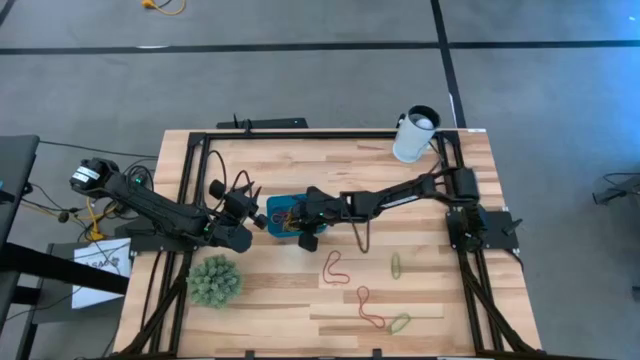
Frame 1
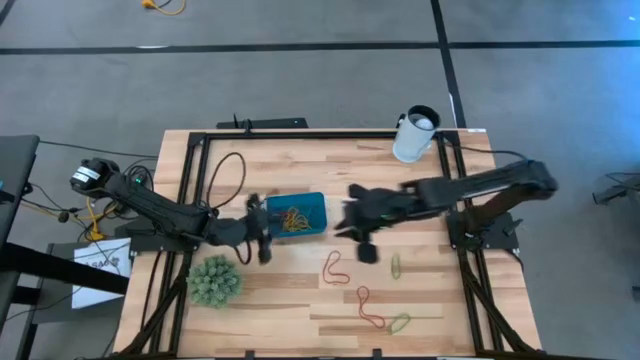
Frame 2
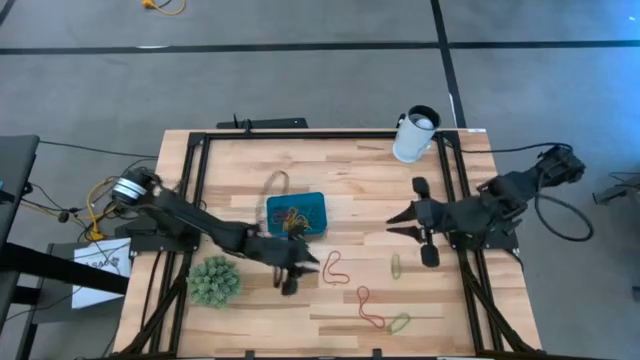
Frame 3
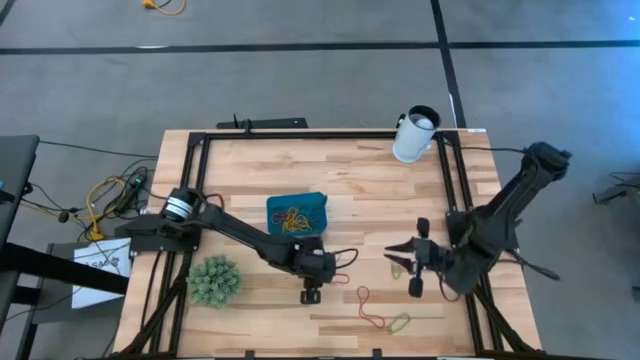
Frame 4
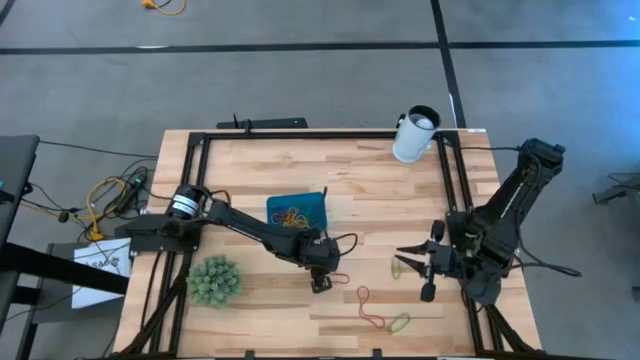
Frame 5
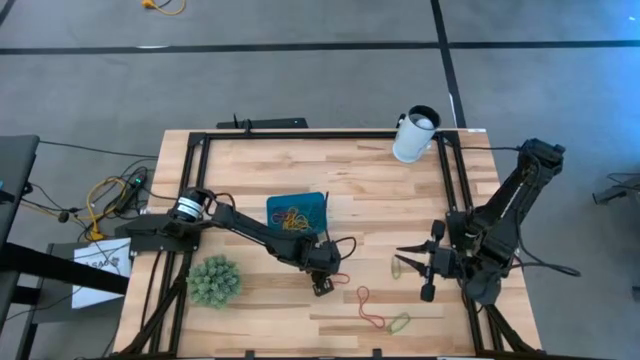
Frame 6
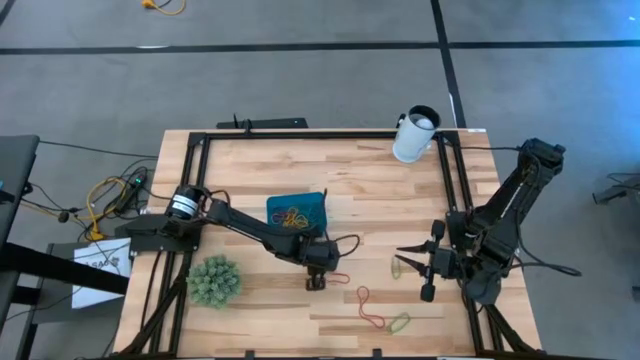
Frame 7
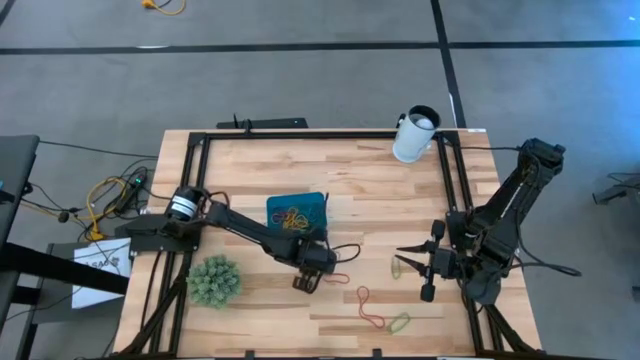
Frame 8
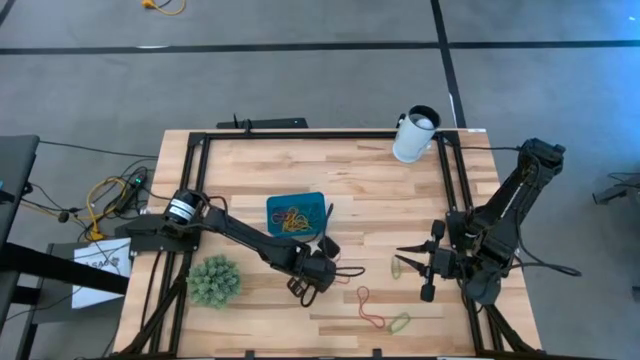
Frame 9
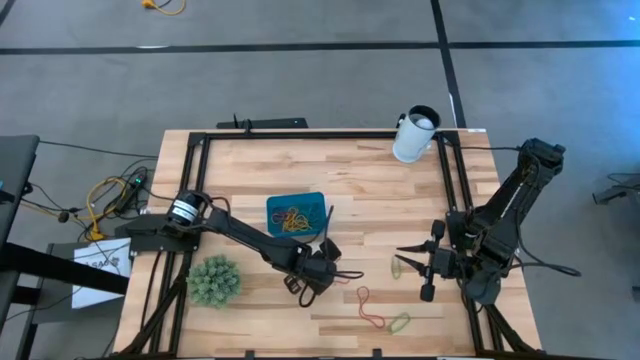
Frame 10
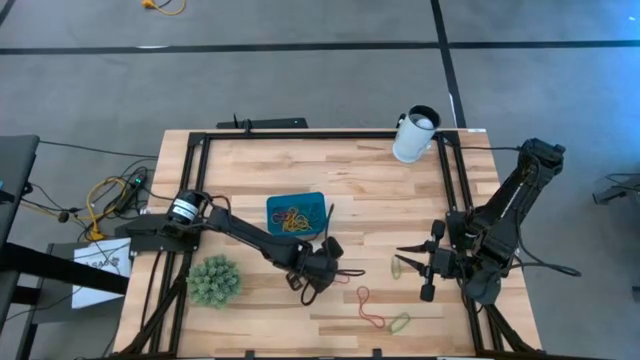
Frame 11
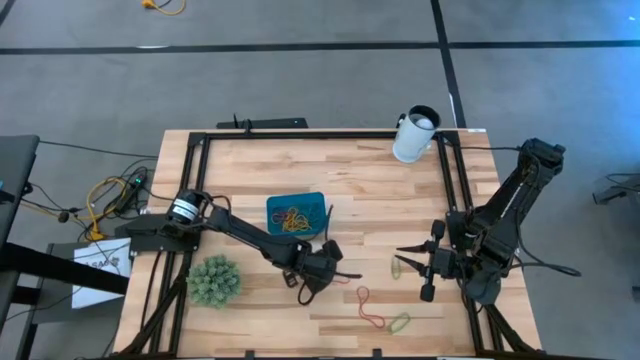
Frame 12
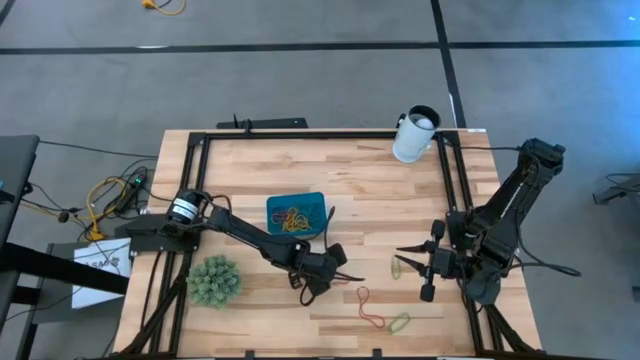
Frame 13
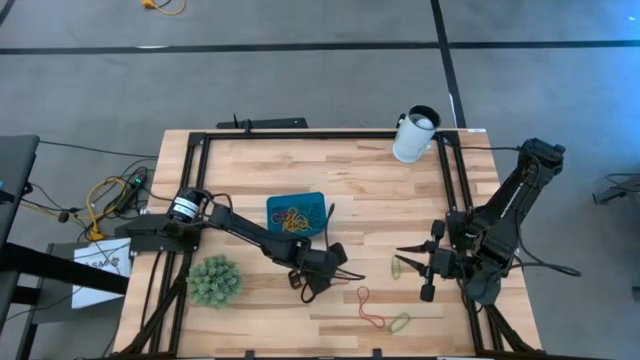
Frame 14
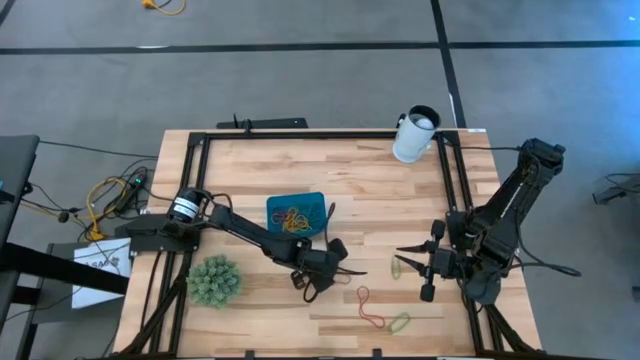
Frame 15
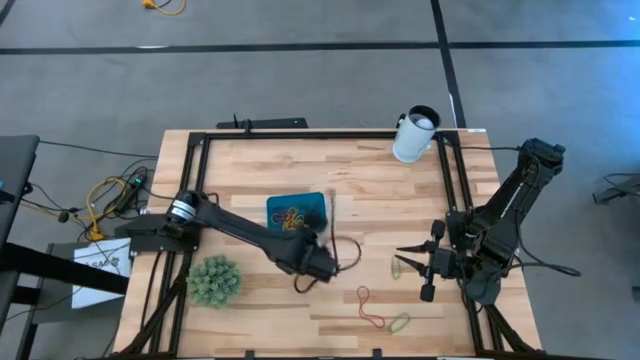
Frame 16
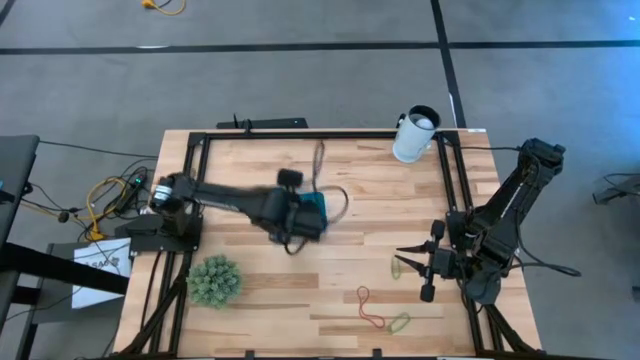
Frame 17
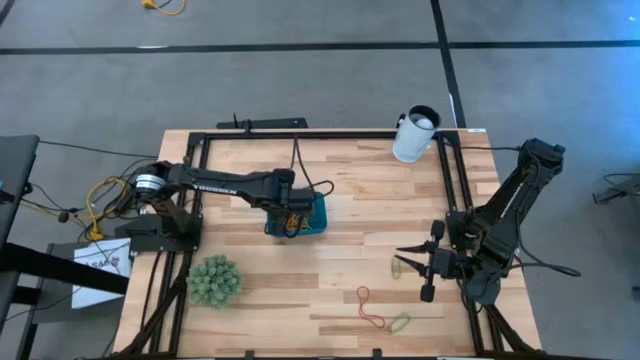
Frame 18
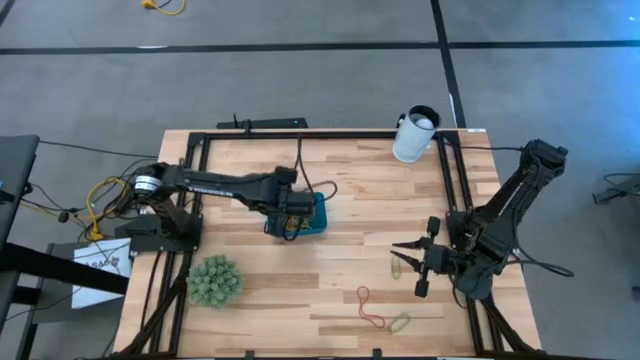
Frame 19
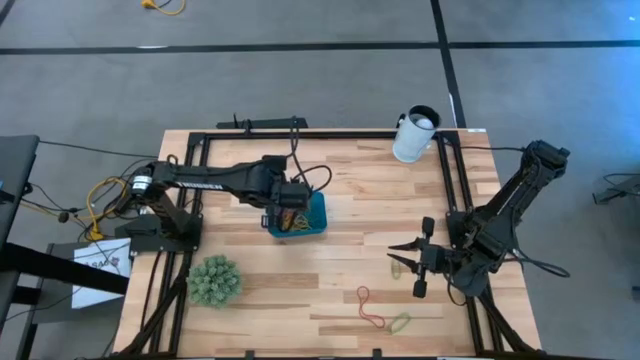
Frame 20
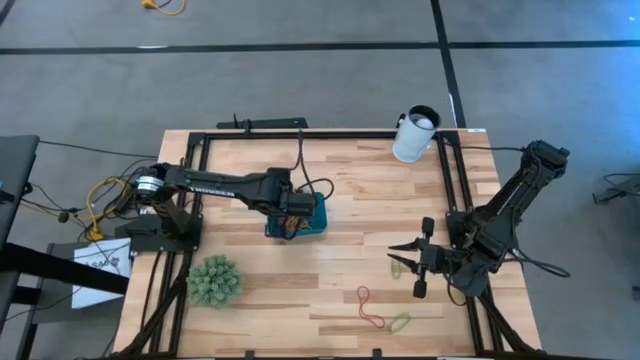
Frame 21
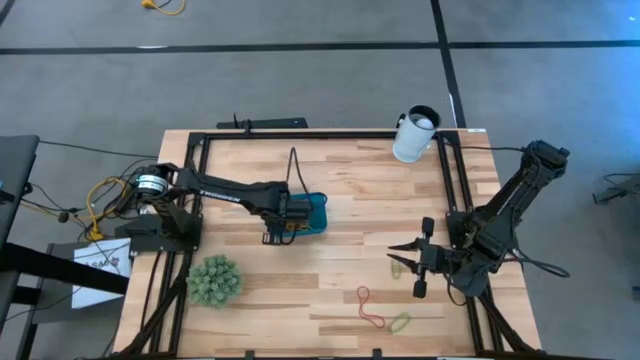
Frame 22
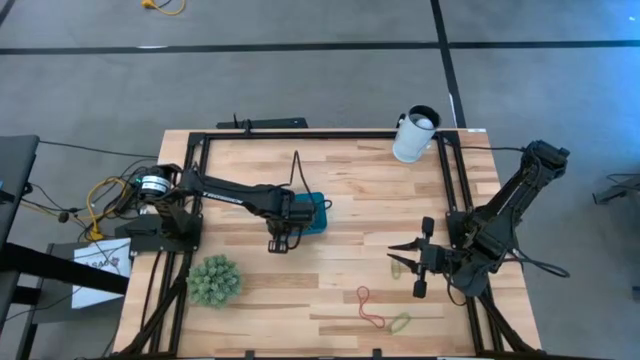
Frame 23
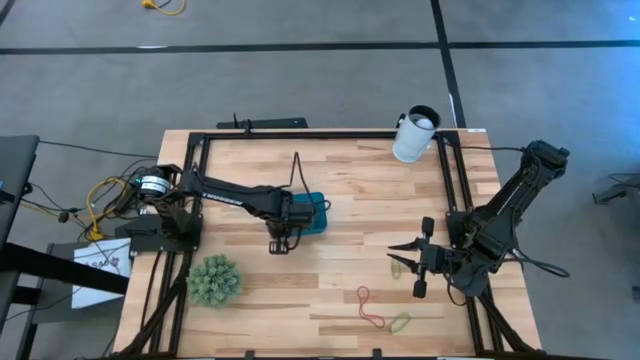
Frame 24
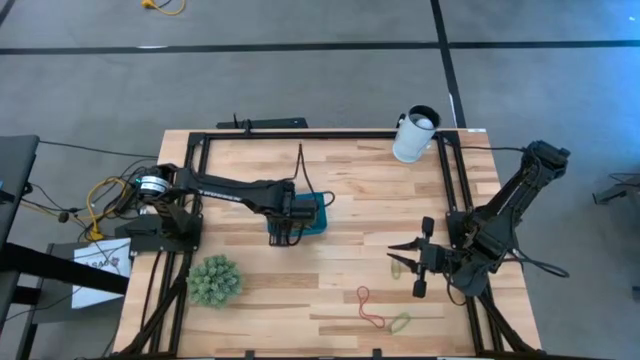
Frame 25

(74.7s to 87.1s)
Task: Pick and place items into bin
Put the red rubber band into the blue bin

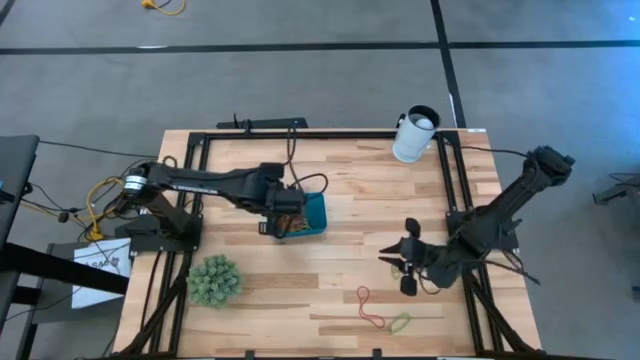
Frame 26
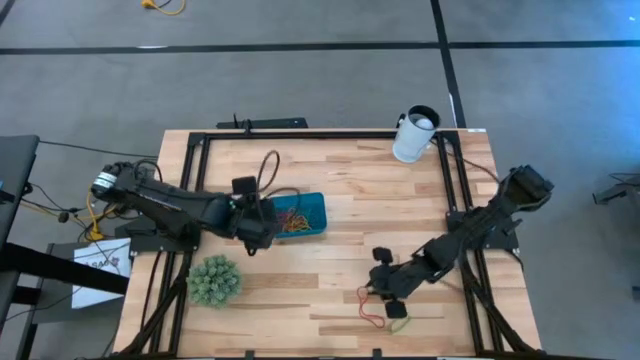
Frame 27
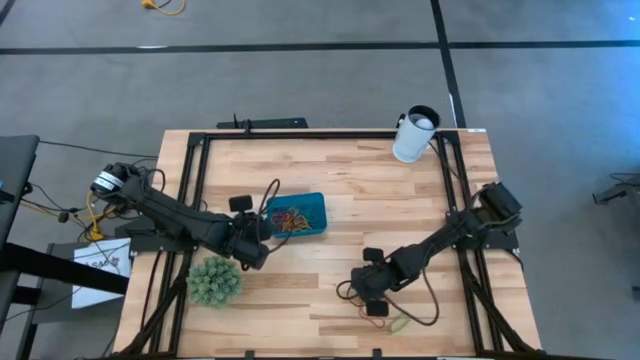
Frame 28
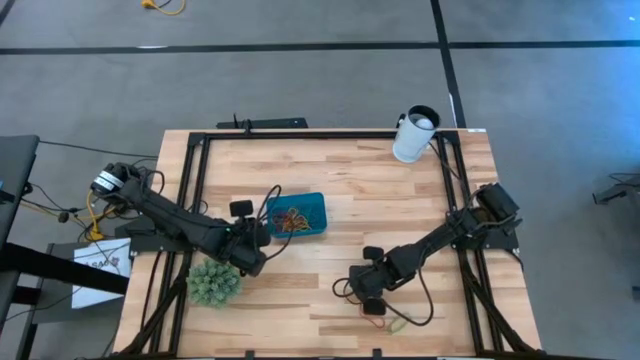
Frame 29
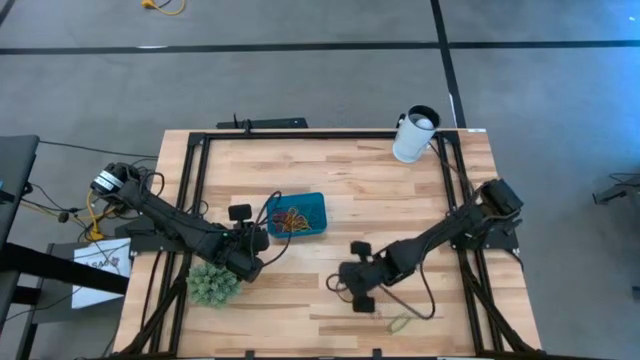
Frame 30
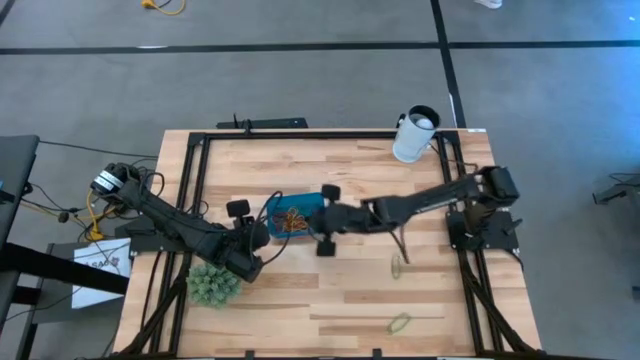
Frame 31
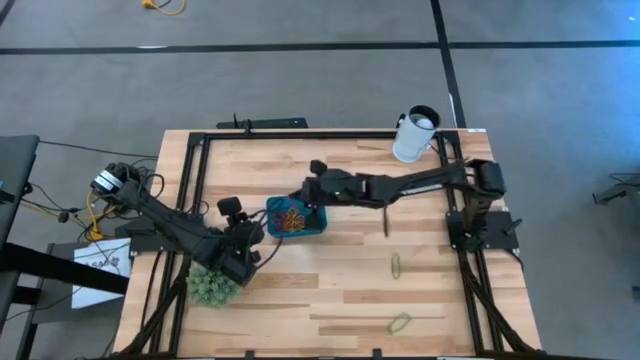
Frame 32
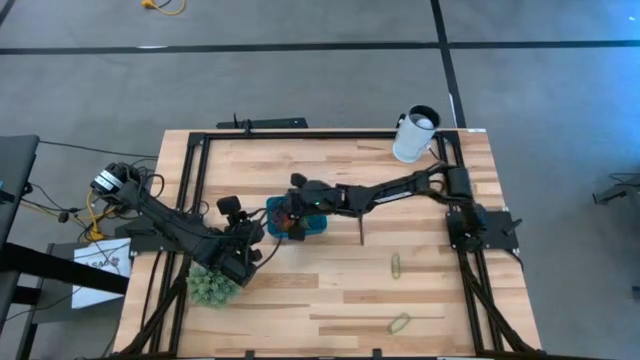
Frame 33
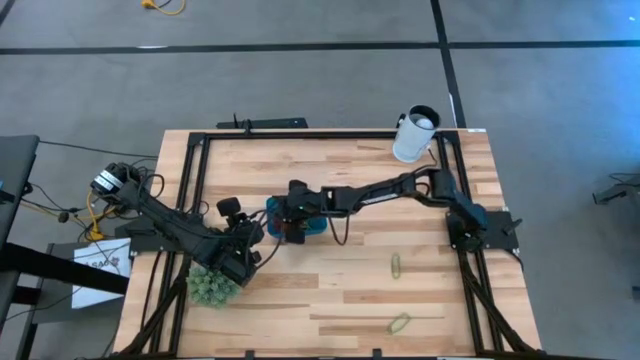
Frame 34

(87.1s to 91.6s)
Put the red rubber band into the blue bin

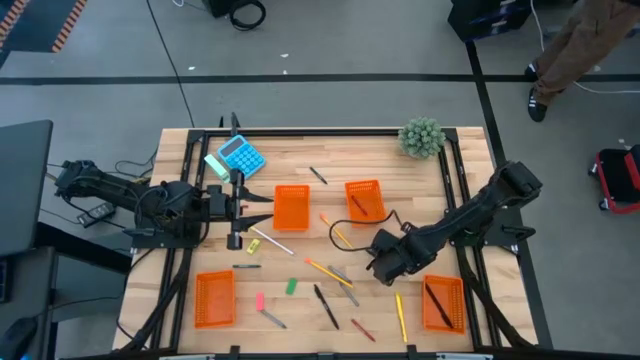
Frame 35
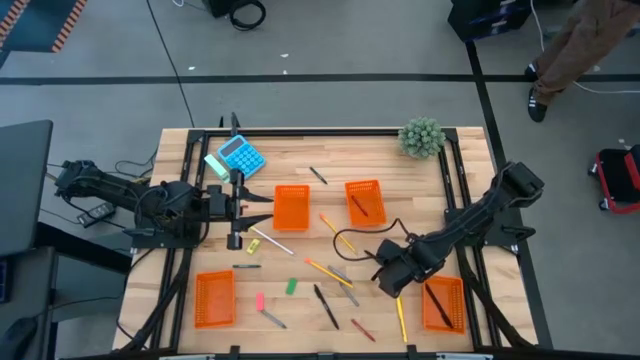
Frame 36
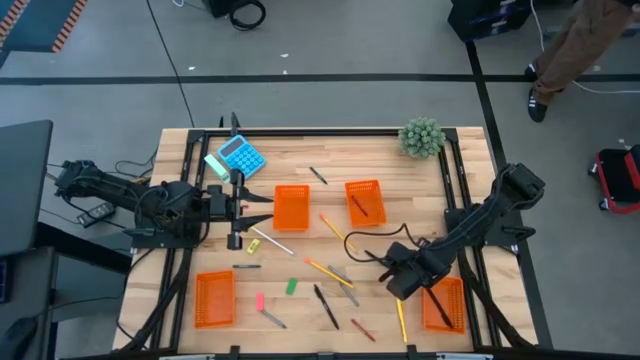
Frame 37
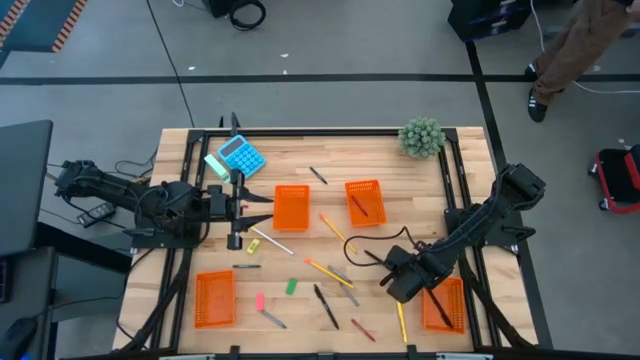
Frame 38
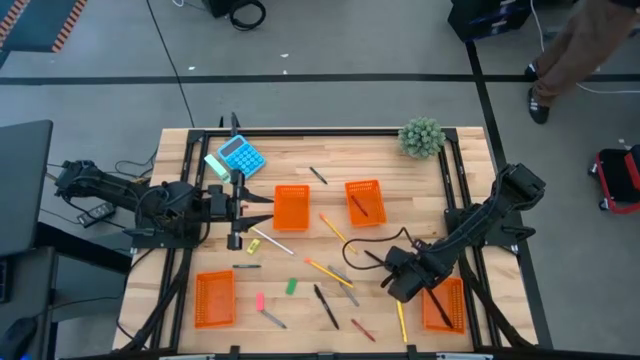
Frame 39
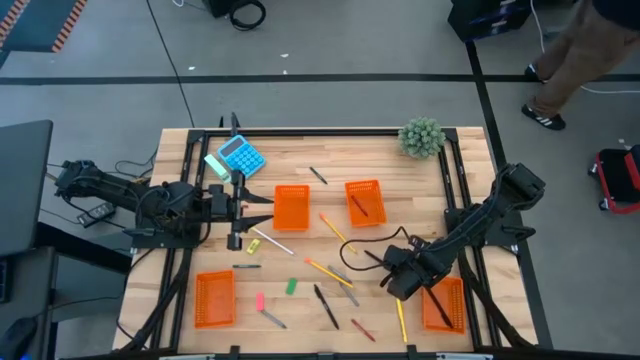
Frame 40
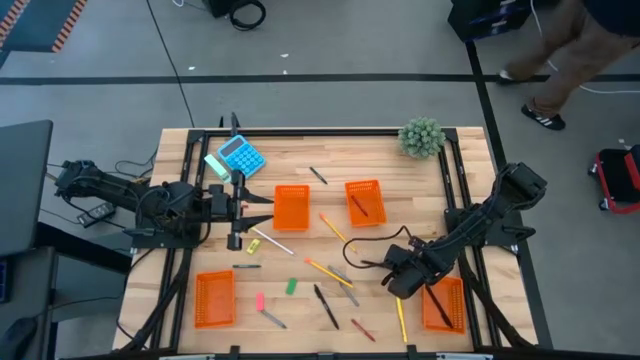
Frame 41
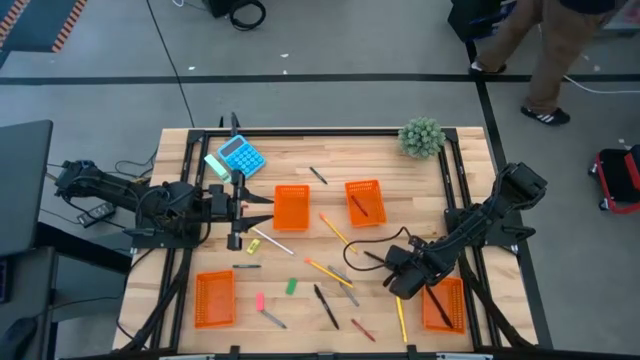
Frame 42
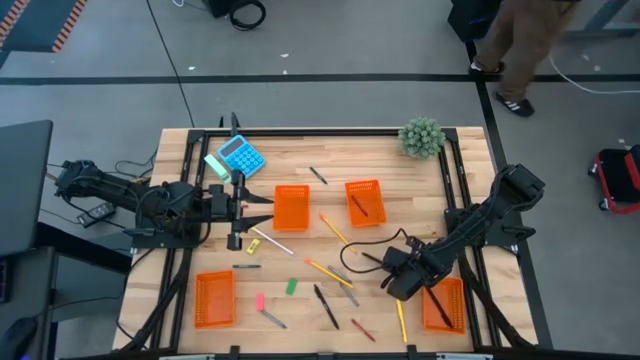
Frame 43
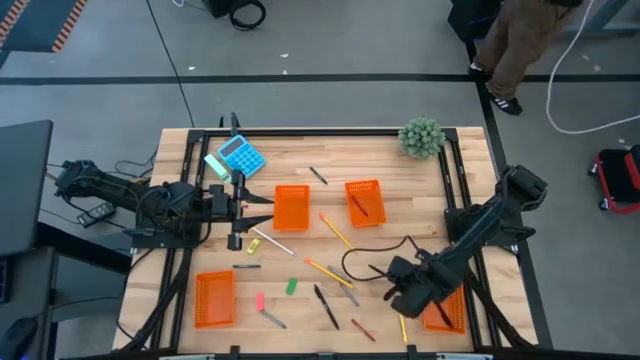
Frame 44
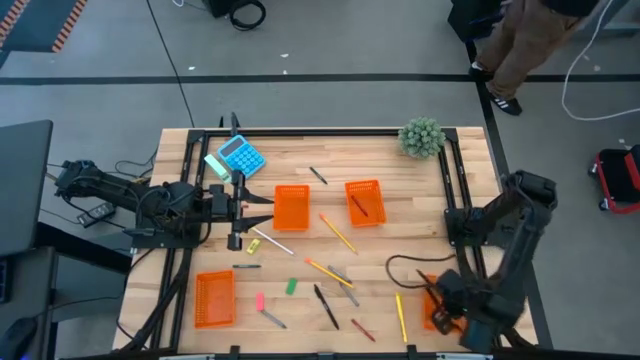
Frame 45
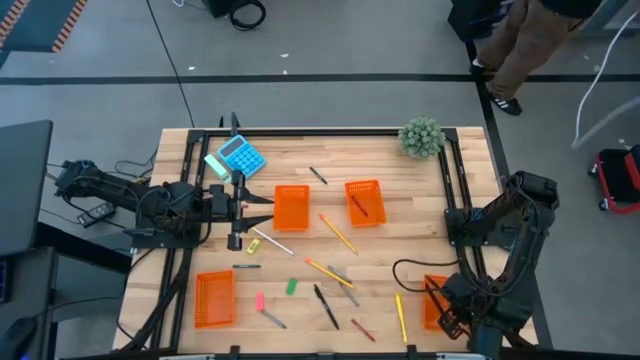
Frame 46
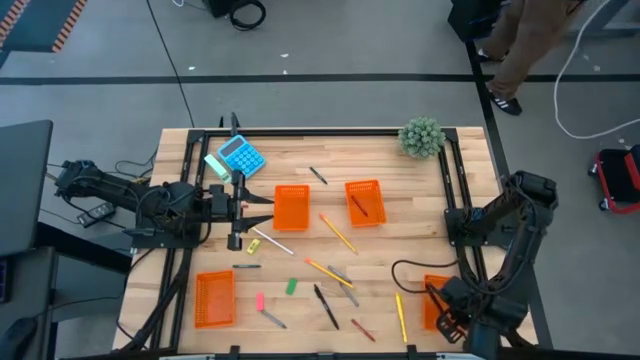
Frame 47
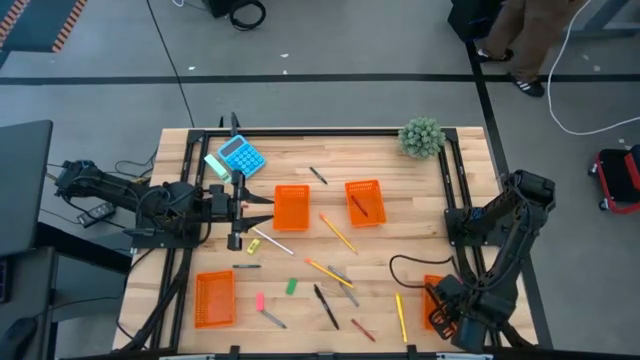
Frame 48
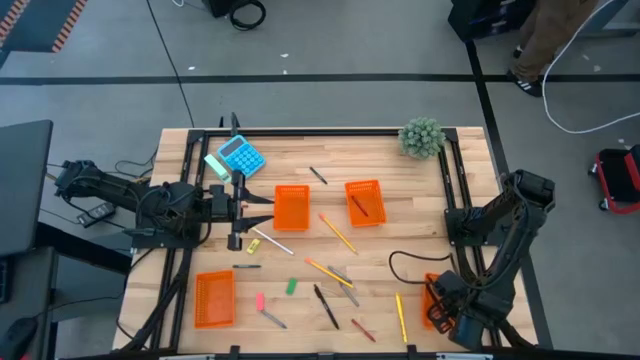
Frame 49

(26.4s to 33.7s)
Task: Sort crayons/erasers/pens/pencils in bins
Put the top black pen into the bottom right orange bin
